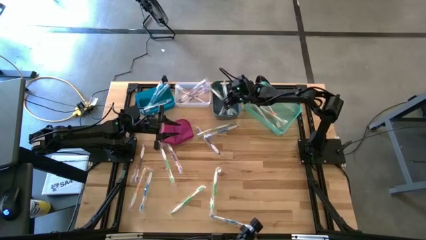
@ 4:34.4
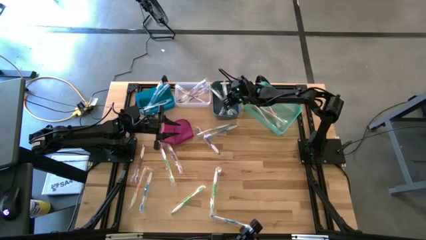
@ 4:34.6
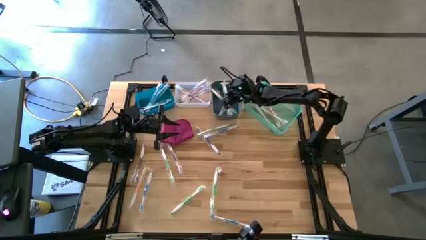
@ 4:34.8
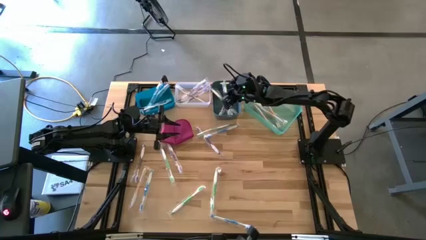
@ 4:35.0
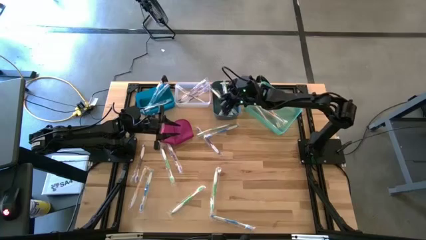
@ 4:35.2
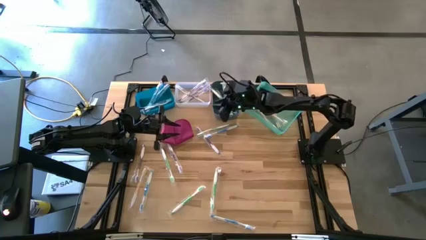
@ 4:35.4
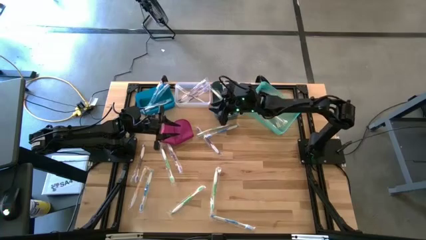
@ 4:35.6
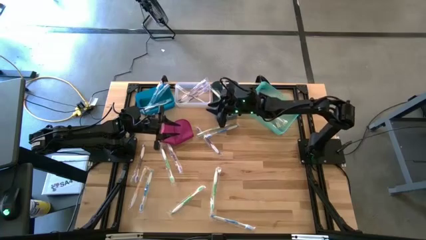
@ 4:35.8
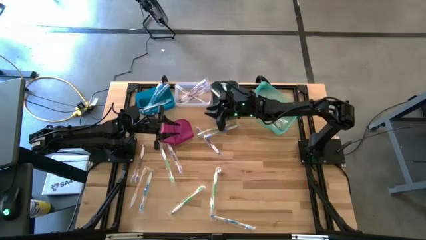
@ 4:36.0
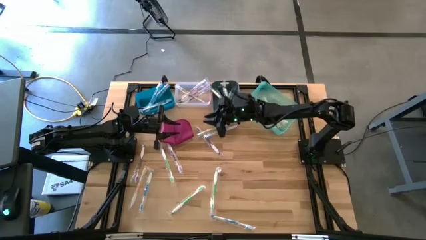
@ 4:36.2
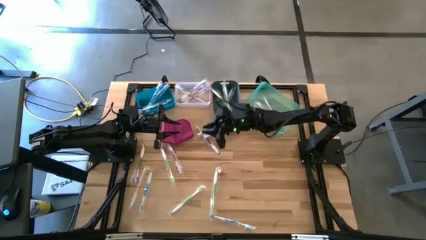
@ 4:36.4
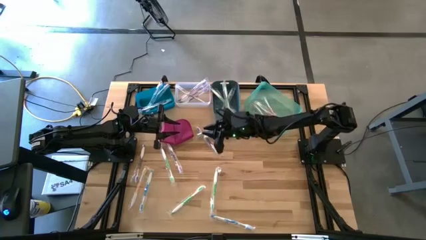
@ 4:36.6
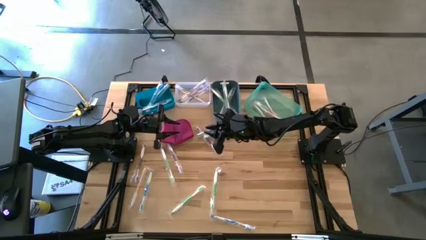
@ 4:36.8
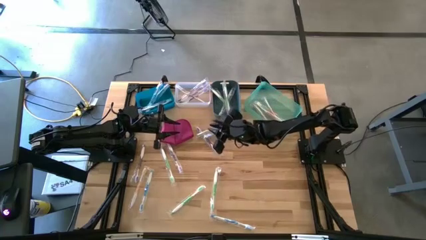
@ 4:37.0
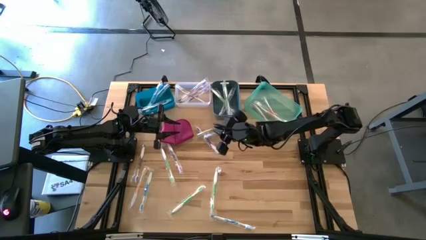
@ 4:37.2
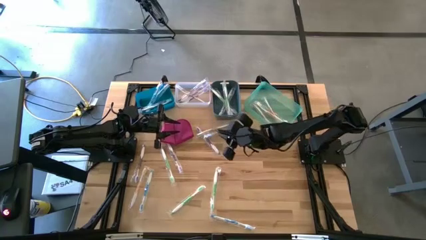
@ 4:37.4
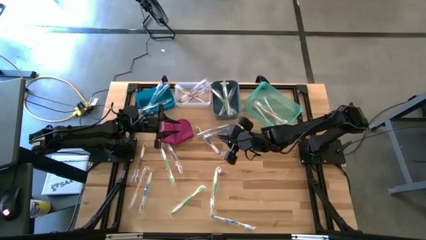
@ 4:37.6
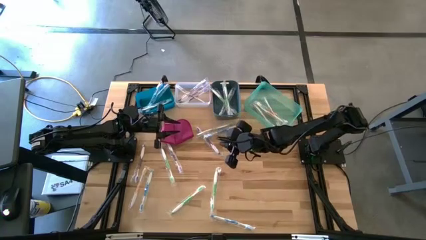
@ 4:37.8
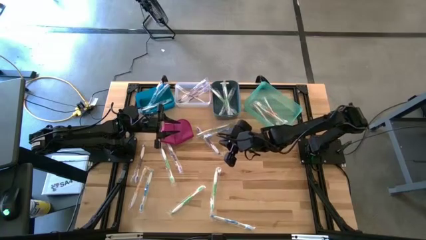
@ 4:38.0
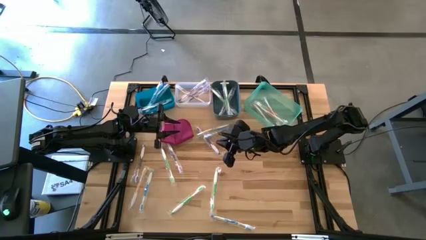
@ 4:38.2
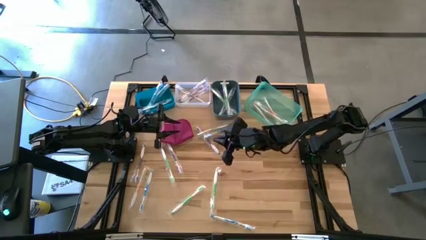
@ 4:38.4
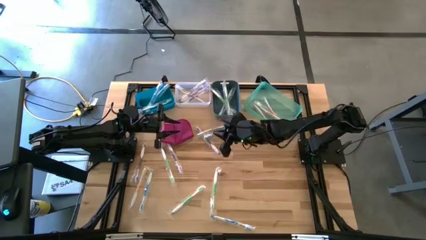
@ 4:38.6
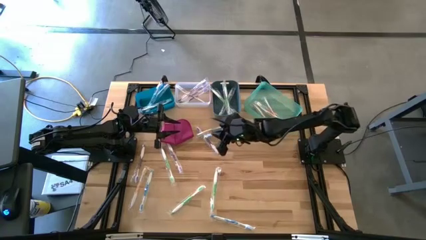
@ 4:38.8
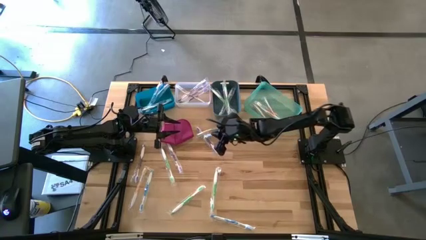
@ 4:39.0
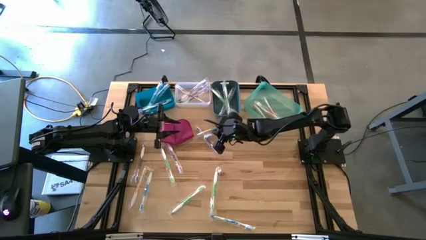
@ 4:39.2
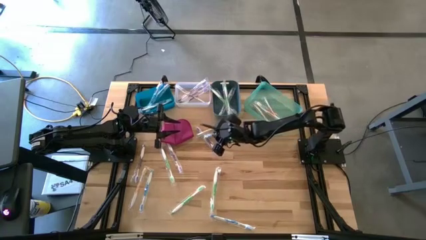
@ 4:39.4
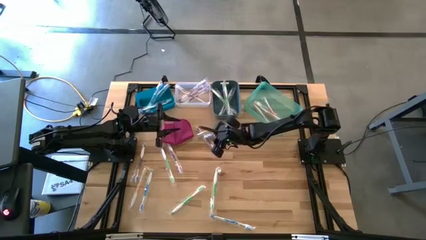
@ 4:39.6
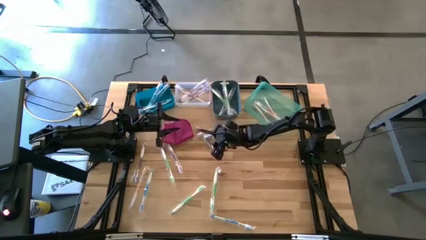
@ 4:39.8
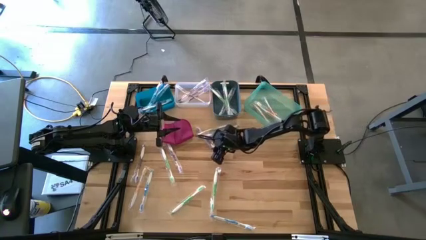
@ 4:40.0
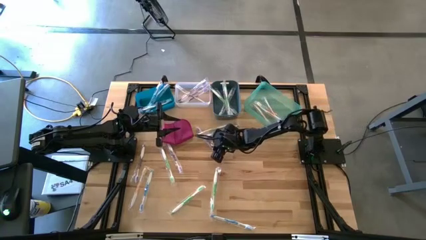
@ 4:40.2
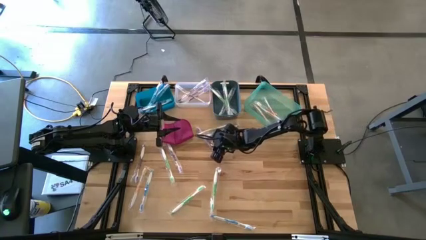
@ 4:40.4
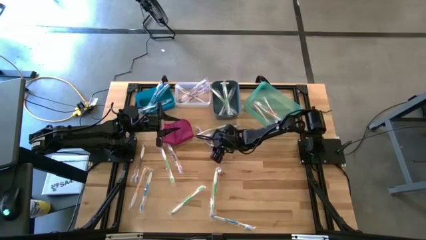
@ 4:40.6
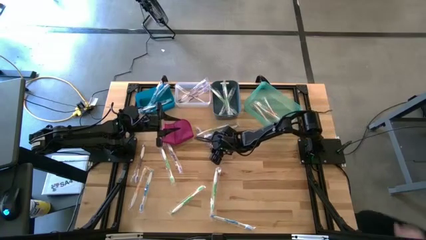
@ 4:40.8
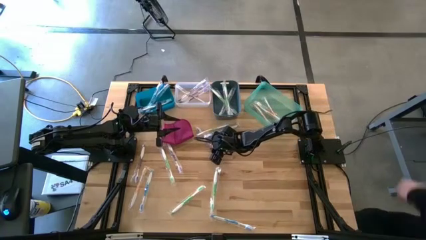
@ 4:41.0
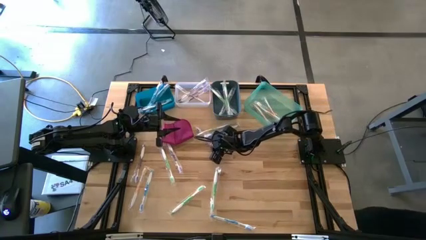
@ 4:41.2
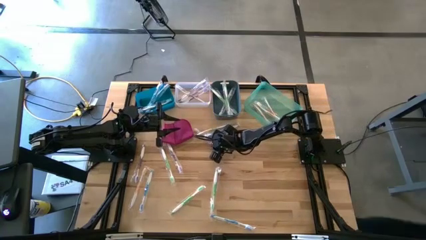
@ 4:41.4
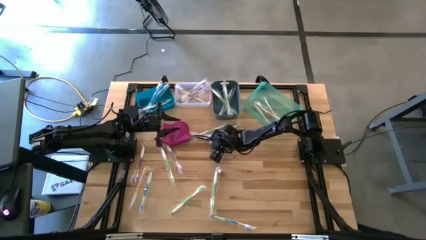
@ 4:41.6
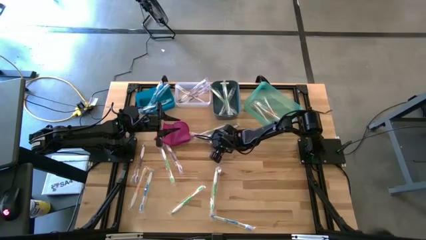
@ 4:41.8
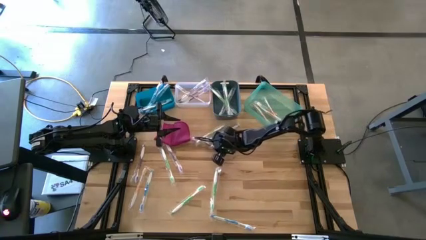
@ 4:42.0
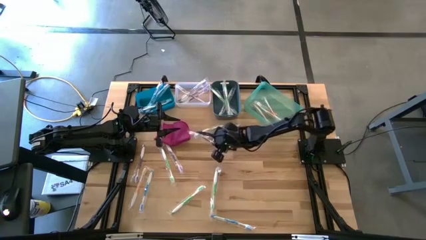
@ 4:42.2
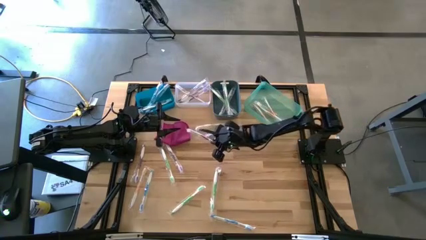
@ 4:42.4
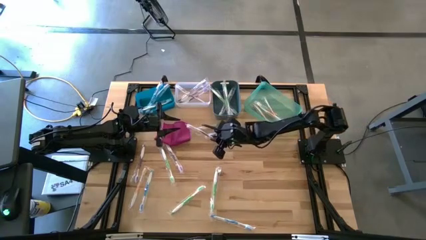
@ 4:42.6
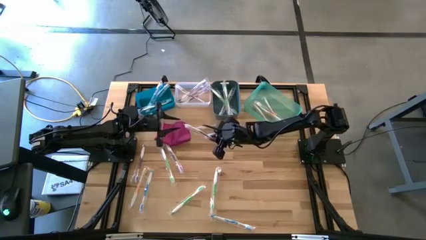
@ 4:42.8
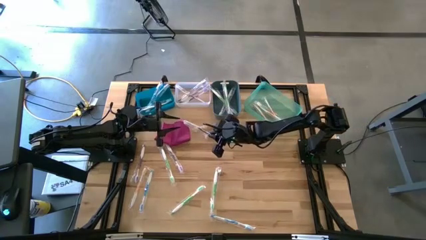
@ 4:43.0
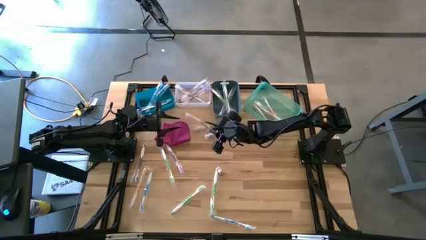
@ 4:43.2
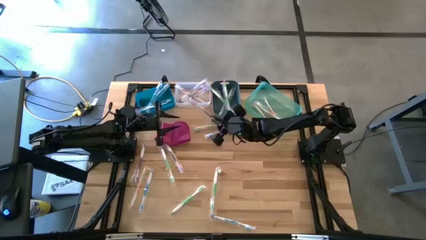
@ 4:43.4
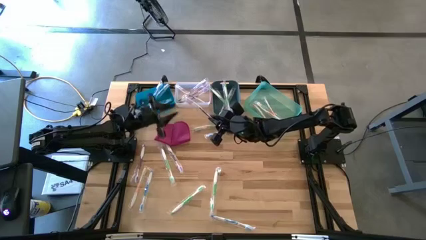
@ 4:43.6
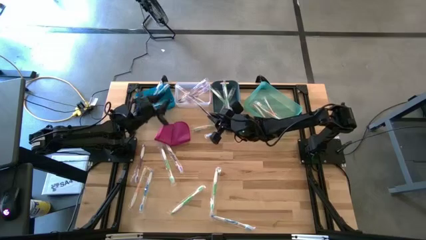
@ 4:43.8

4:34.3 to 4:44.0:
Task: Pick & Place Toothbrushes
Put the violet toothbrush into the white bin

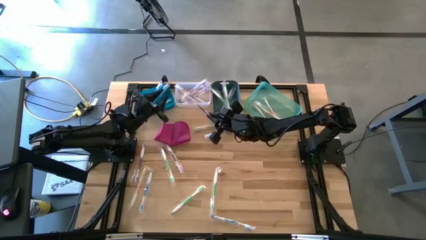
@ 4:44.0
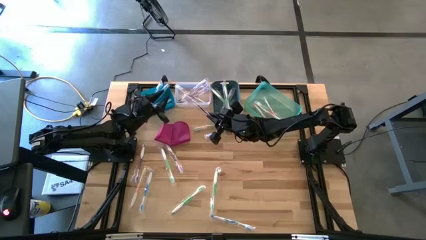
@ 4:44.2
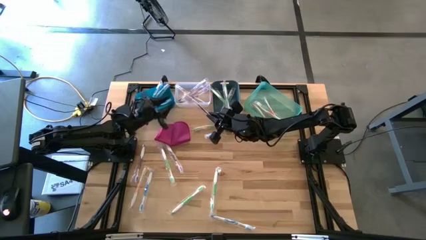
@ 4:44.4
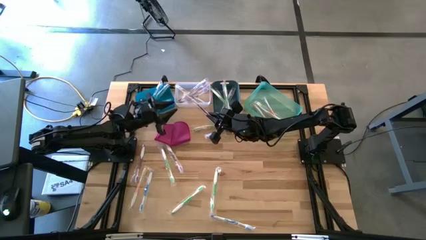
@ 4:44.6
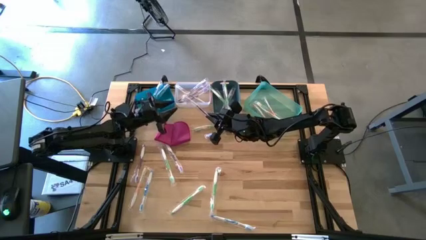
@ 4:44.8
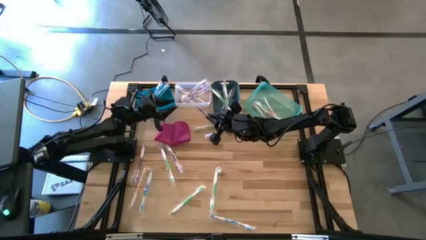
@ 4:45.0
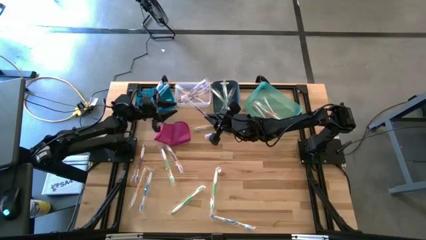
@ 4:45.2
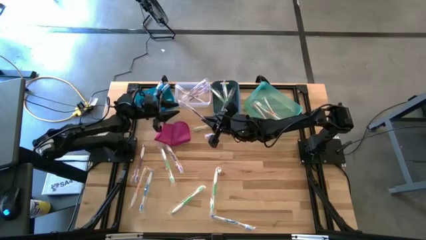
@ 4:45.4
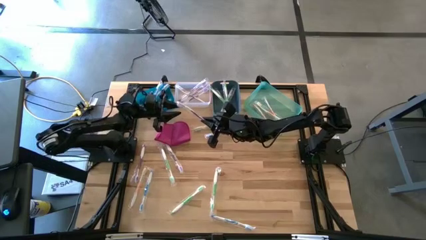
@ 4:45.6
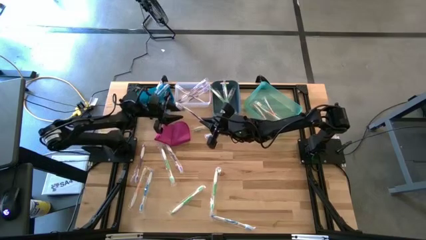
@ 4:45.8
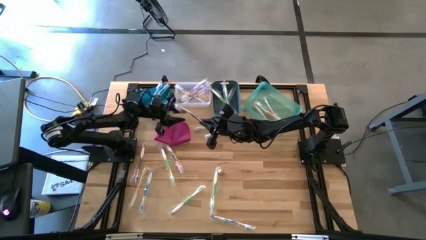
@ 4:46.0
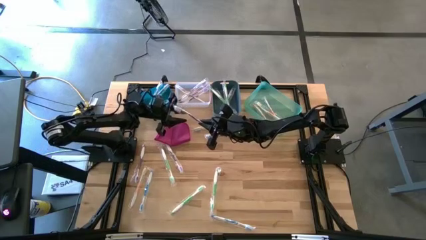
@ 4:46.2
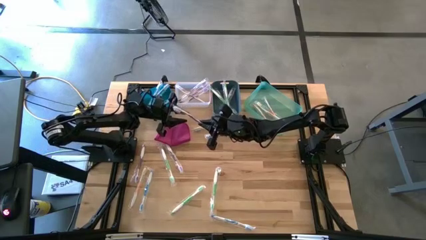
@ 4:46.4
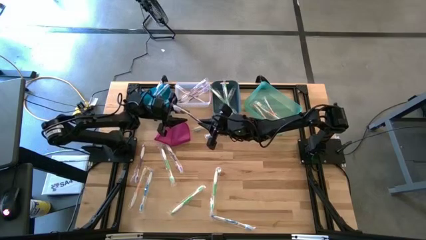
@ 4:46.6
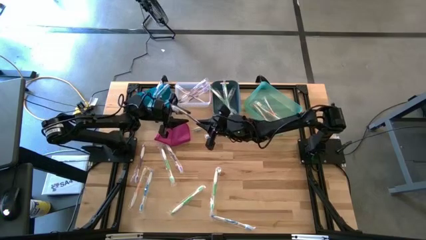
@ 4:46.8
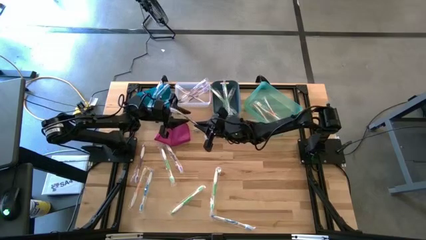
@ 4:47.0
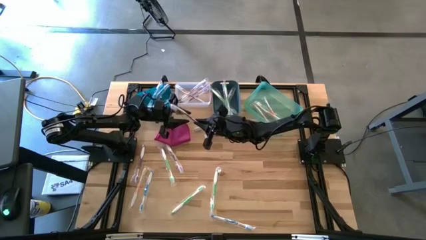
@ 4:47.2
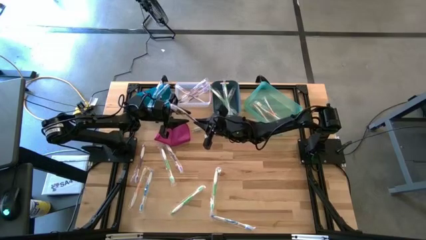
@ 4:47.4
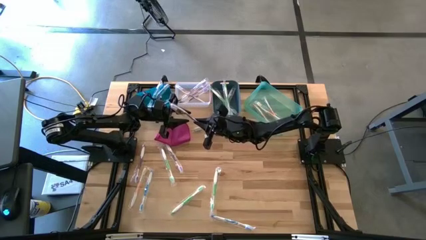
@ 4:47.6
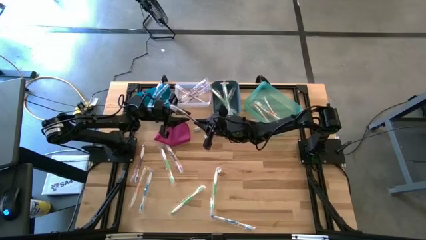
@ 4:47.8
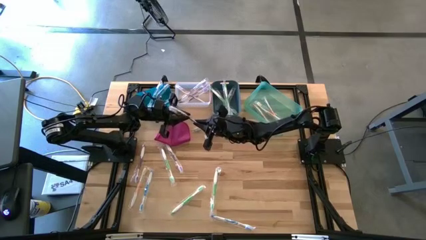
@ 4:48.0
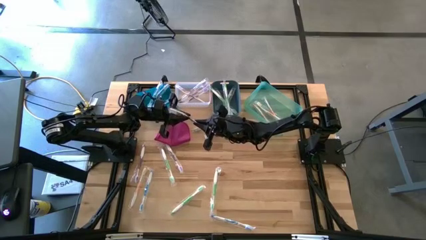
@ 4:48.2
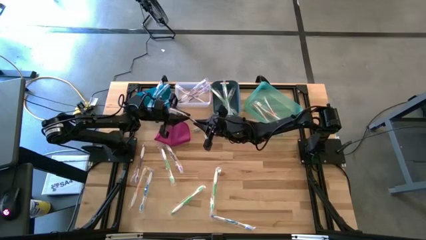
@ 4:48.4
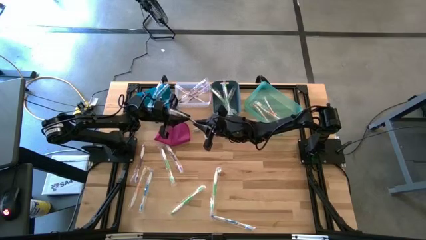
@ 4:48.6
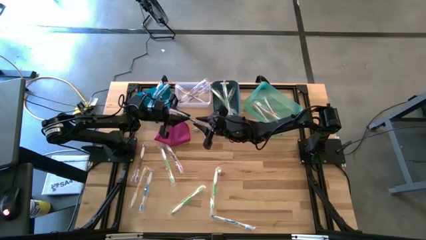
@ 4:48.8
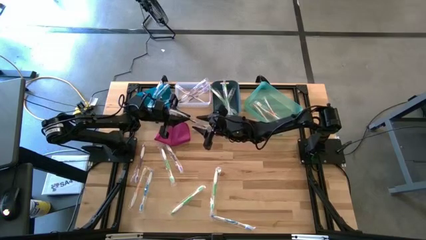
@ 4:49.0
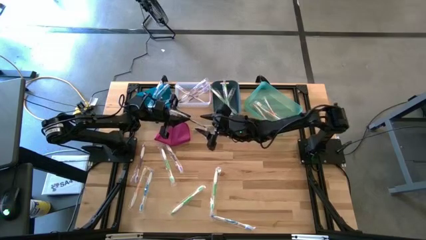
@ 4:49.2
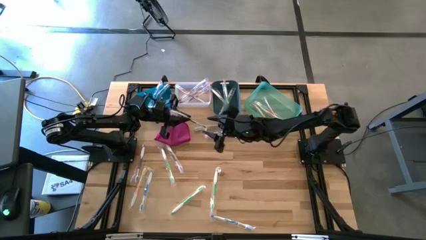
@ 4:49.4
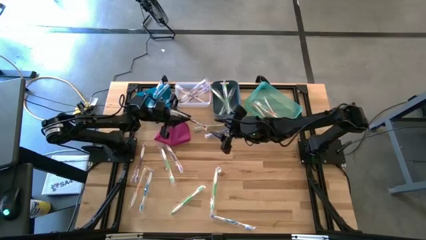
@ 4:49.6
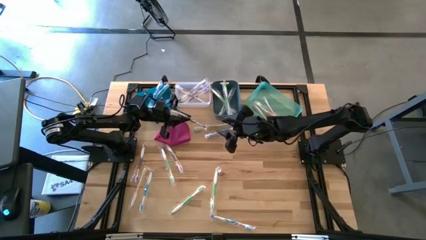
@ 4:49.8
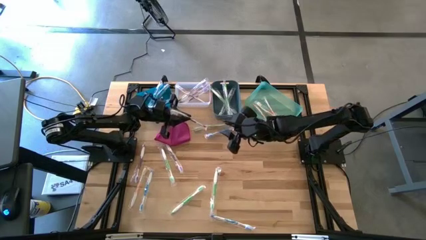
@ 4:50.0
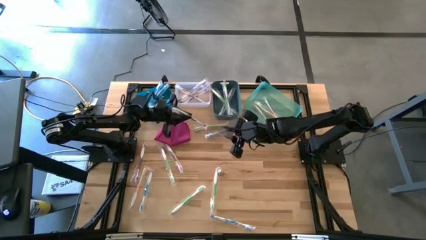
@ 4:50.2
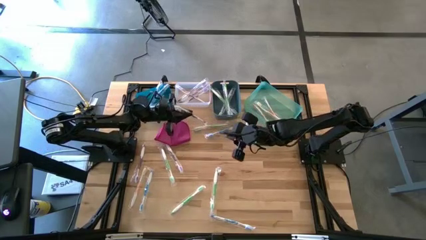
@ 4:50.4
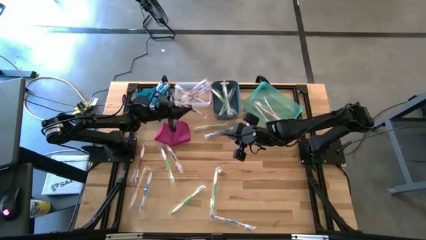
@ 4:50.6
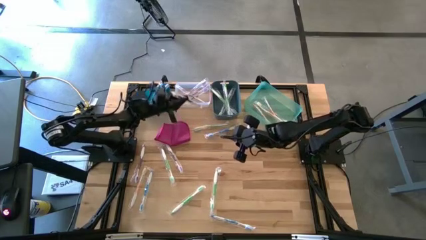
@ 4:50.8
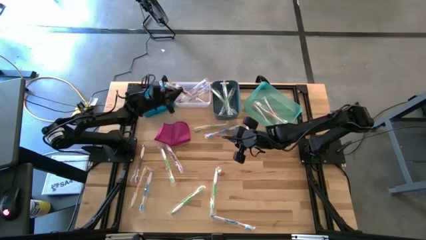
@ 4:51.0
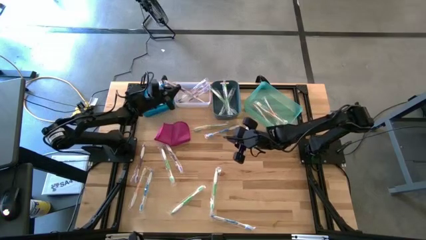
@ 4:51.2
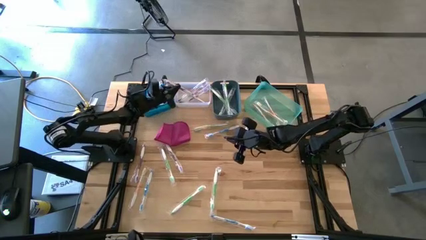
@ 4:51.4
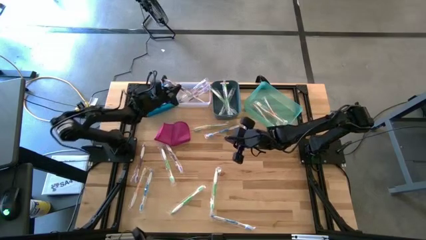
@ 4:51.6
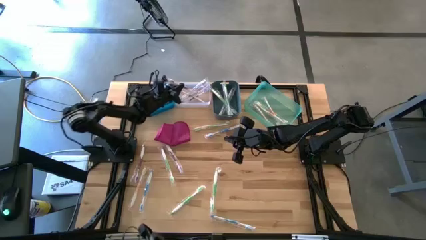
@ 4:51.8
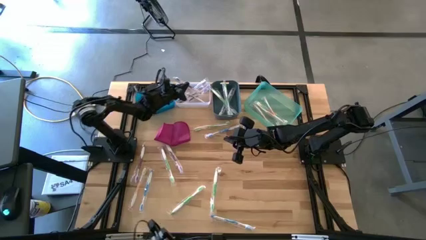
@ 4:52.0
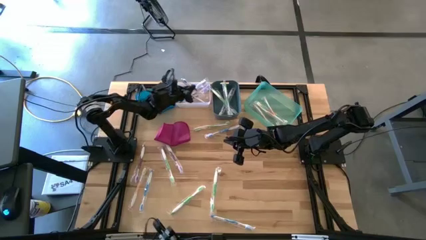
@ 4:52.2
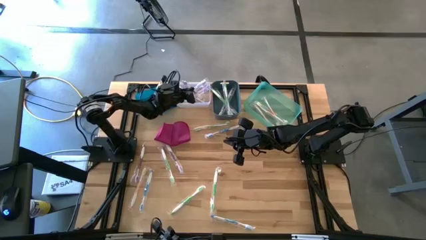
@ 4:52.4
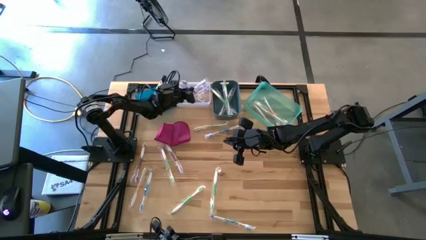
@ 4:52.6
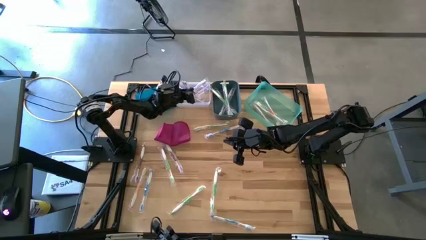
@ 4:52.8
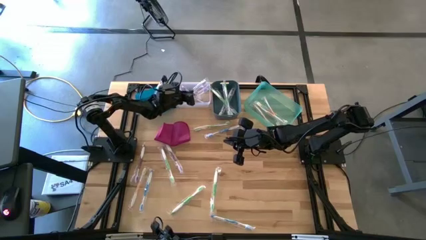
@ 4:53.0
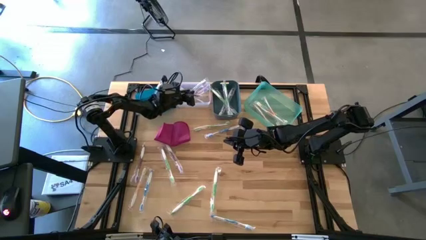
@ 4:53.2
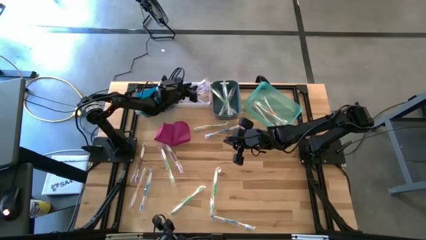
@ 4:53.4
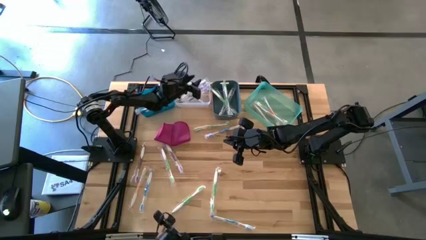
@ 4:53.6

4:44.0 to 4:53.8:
Put the violet toothbrush into the white bin
